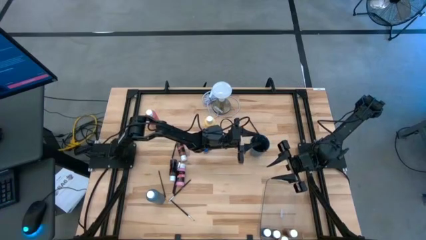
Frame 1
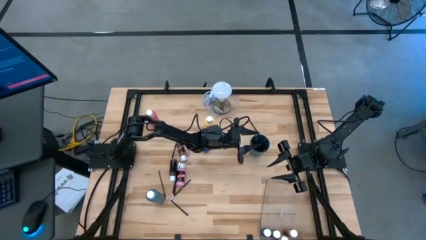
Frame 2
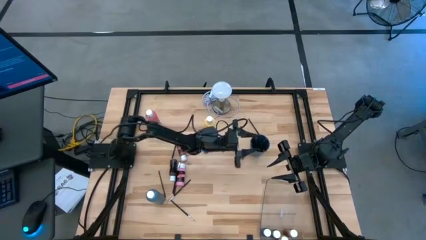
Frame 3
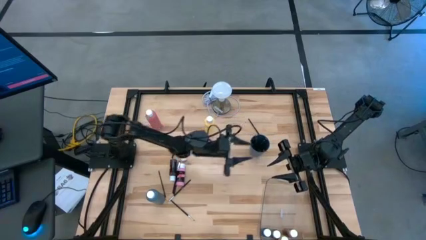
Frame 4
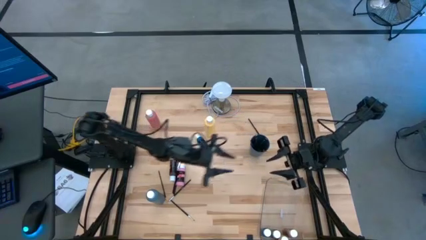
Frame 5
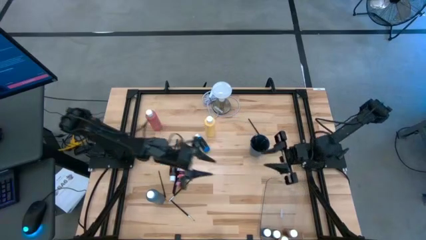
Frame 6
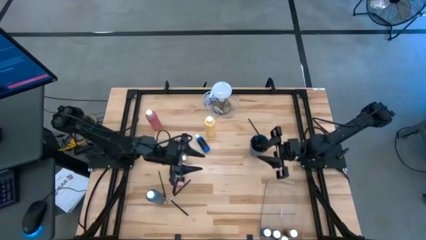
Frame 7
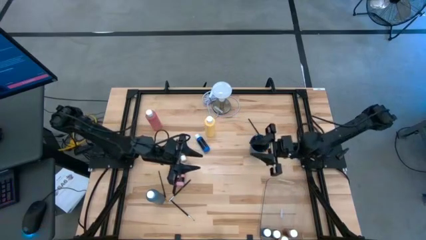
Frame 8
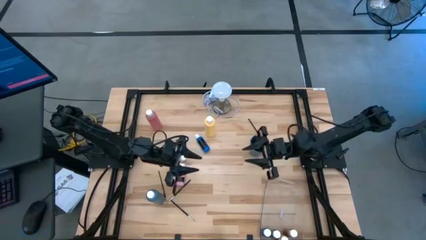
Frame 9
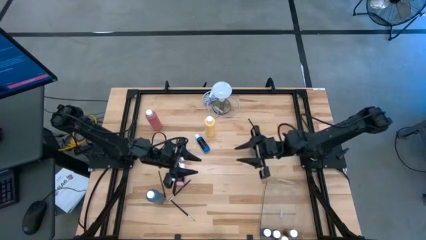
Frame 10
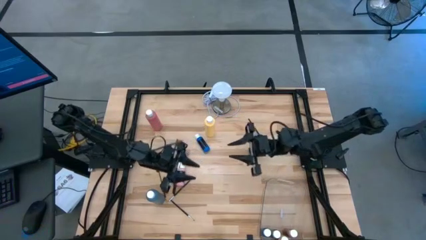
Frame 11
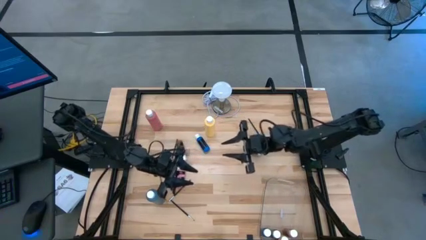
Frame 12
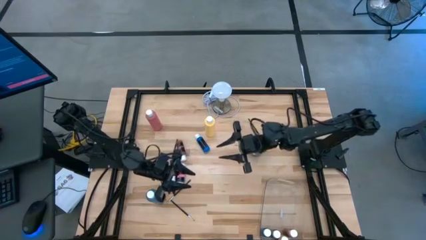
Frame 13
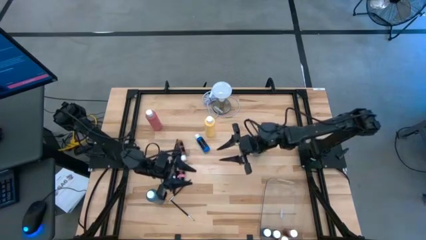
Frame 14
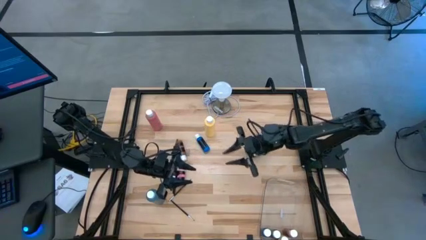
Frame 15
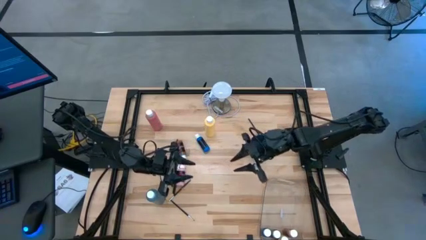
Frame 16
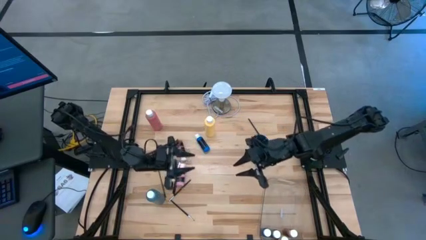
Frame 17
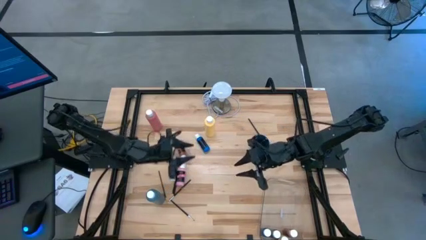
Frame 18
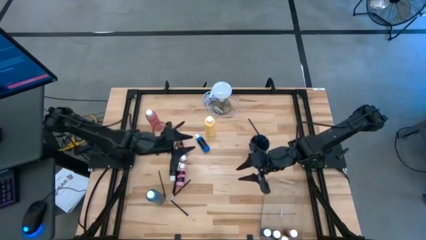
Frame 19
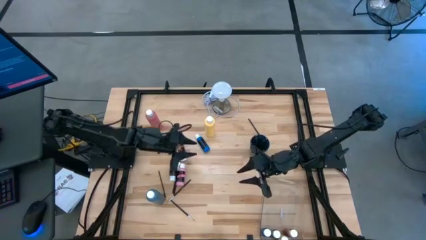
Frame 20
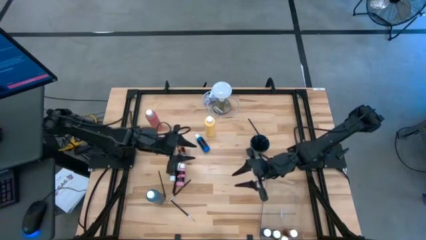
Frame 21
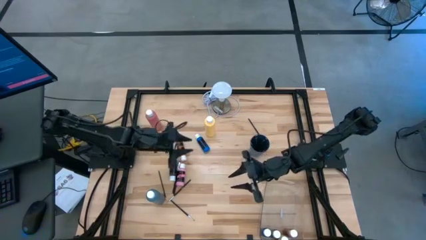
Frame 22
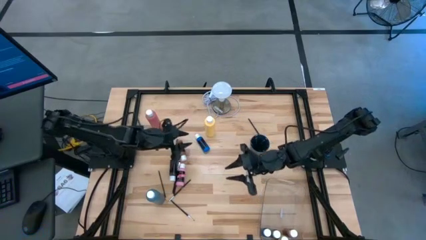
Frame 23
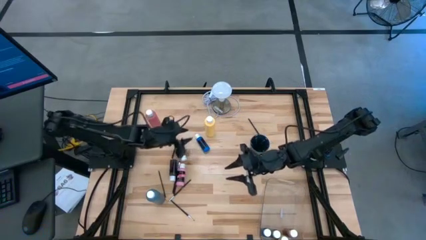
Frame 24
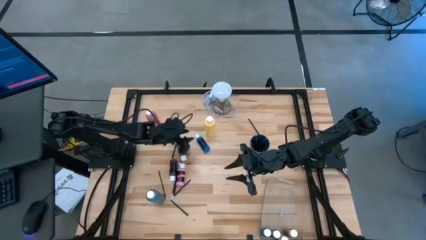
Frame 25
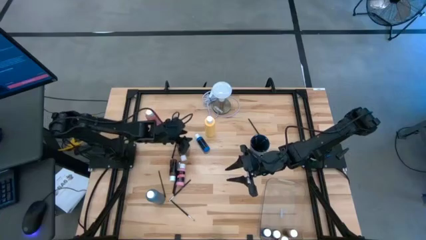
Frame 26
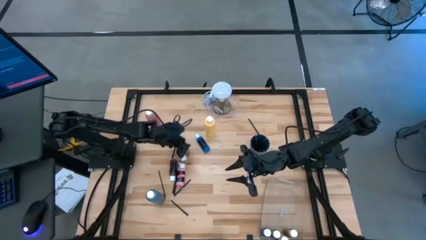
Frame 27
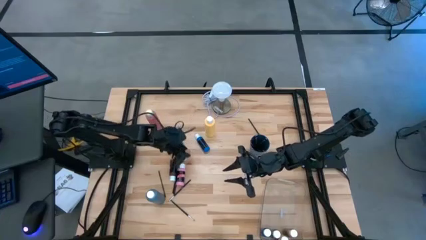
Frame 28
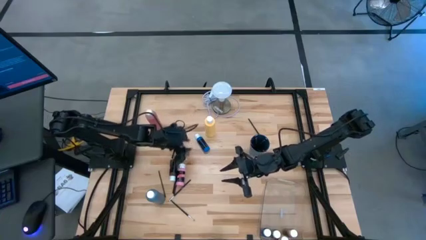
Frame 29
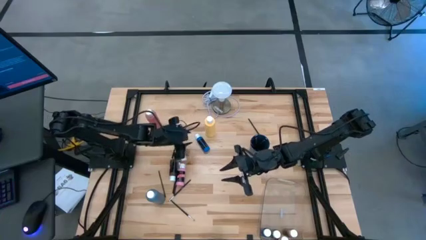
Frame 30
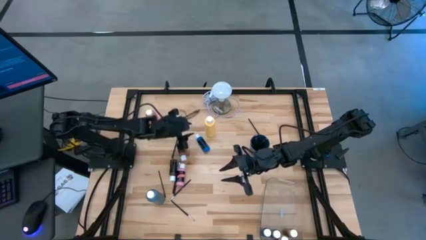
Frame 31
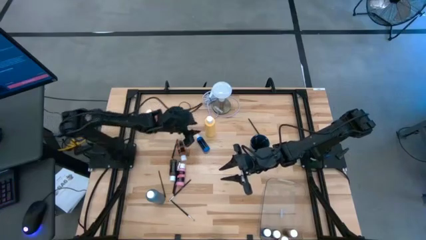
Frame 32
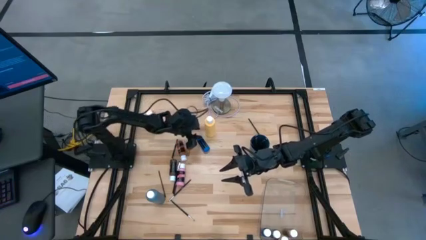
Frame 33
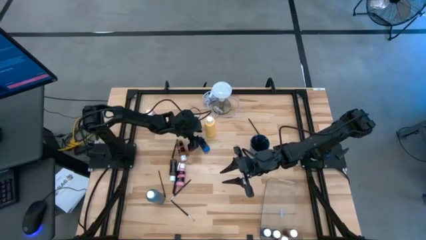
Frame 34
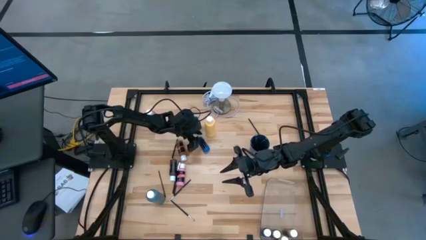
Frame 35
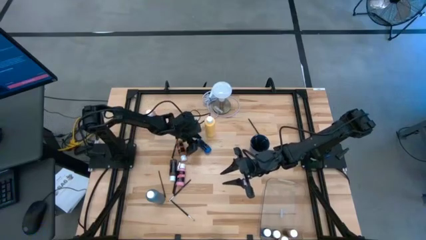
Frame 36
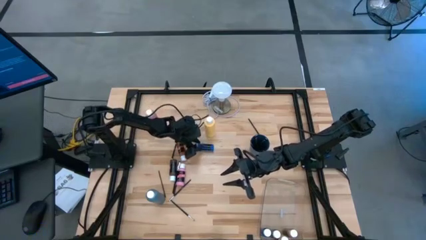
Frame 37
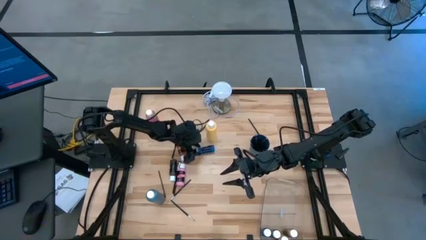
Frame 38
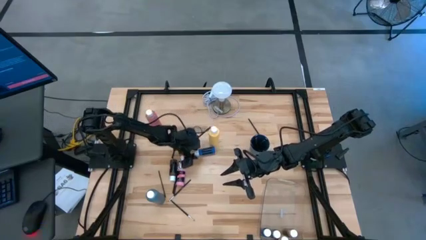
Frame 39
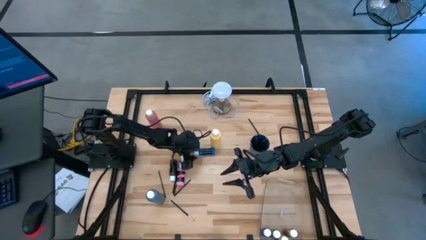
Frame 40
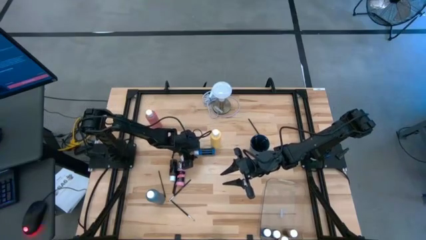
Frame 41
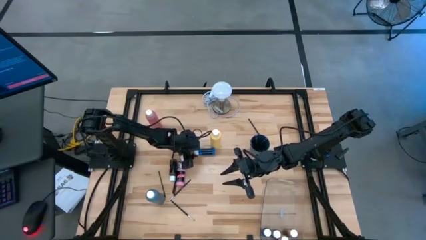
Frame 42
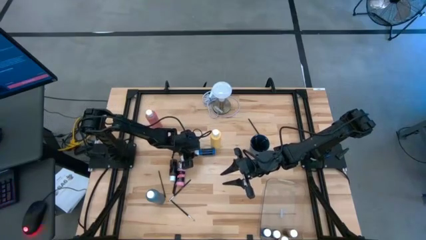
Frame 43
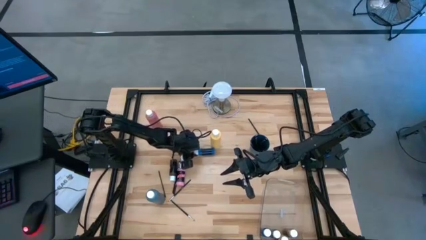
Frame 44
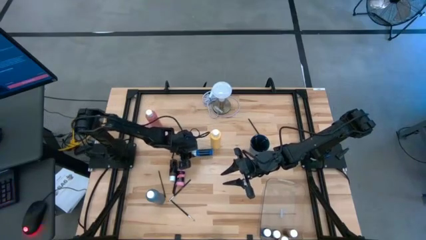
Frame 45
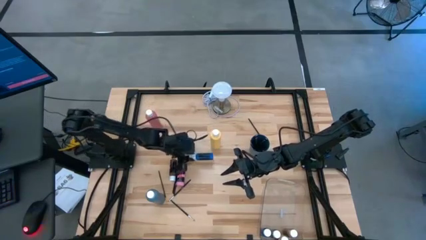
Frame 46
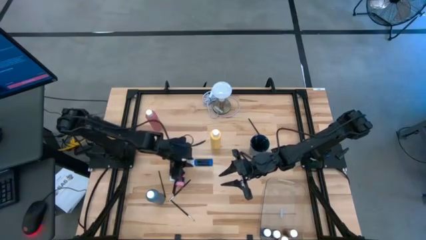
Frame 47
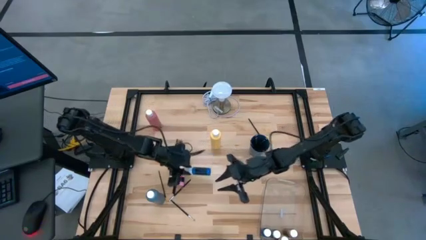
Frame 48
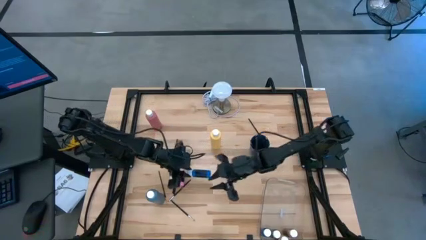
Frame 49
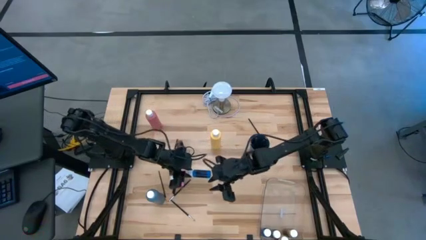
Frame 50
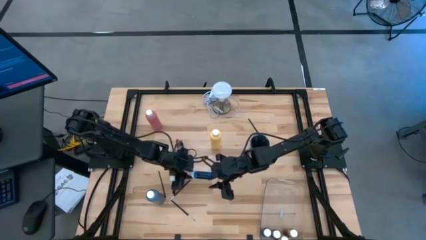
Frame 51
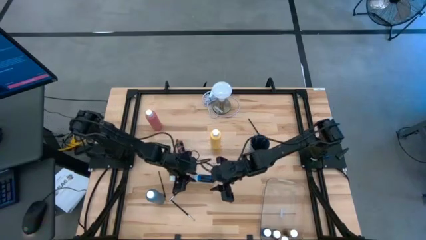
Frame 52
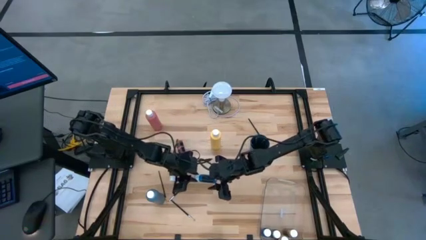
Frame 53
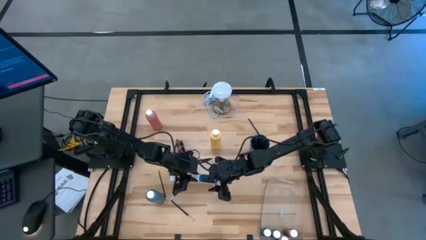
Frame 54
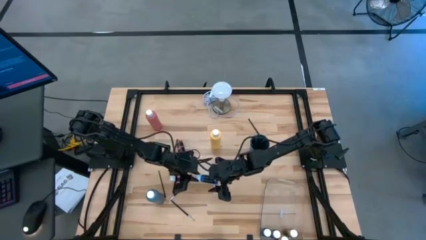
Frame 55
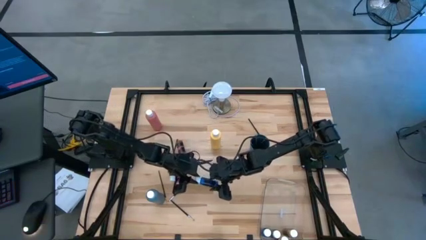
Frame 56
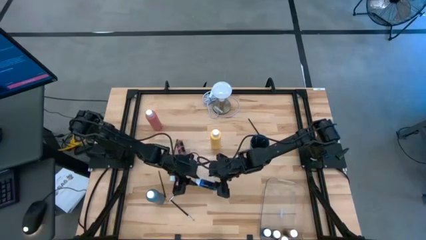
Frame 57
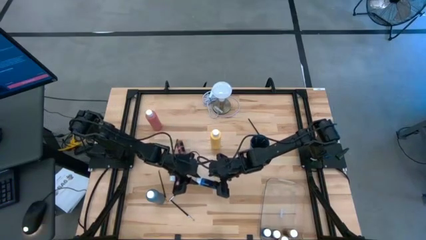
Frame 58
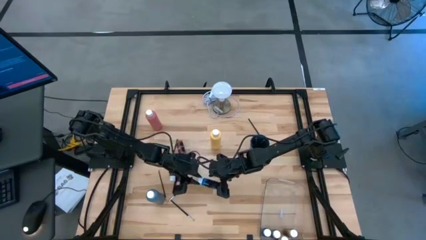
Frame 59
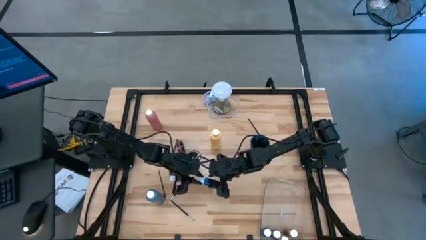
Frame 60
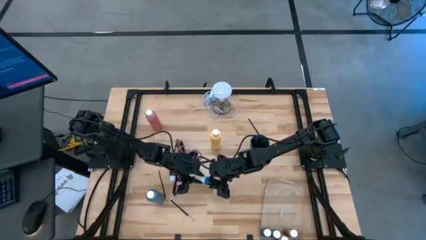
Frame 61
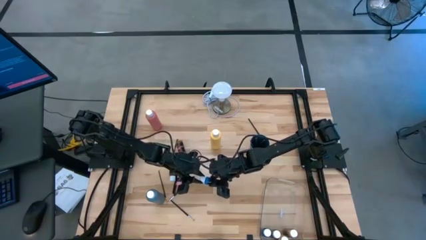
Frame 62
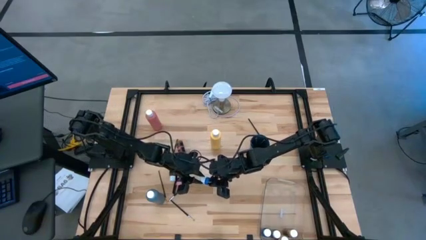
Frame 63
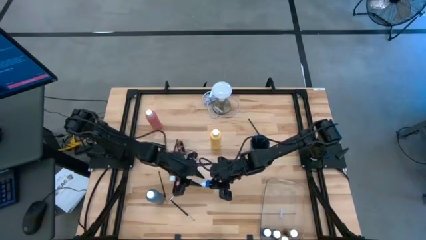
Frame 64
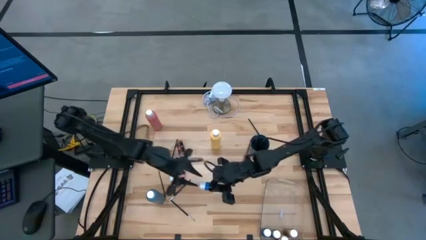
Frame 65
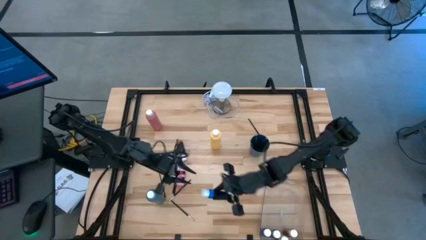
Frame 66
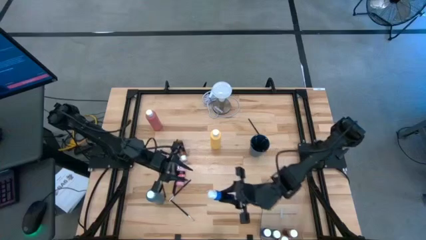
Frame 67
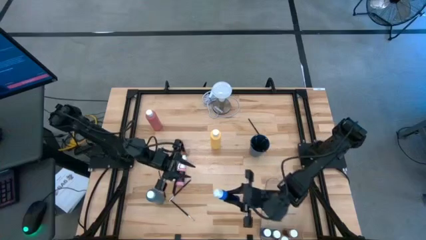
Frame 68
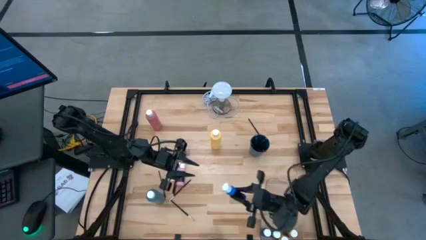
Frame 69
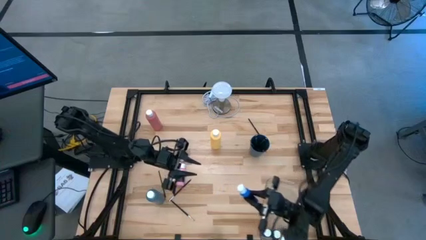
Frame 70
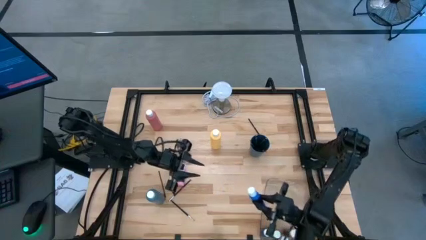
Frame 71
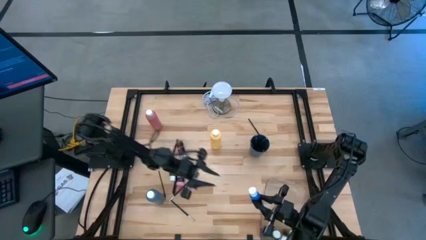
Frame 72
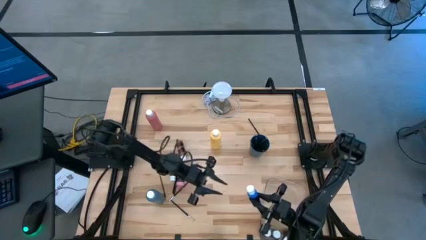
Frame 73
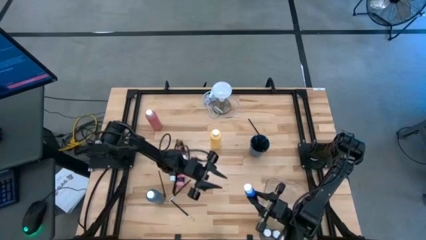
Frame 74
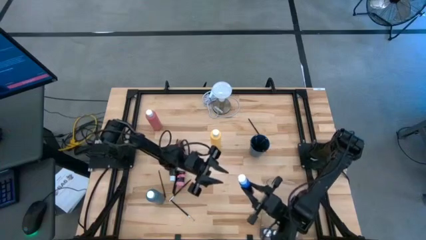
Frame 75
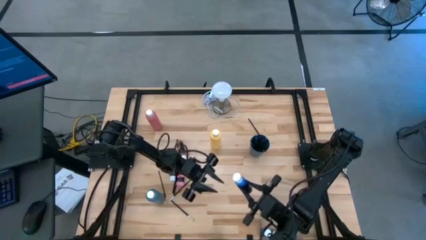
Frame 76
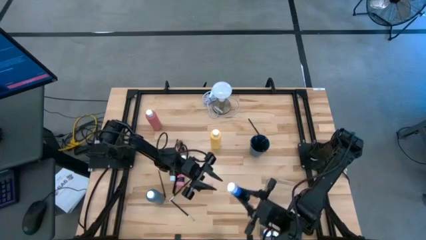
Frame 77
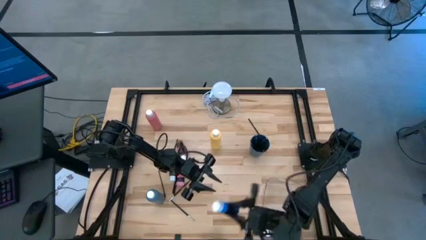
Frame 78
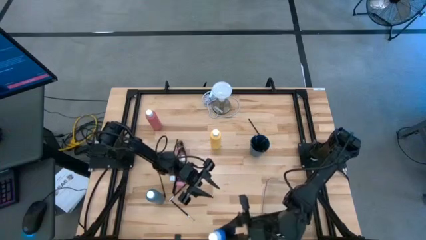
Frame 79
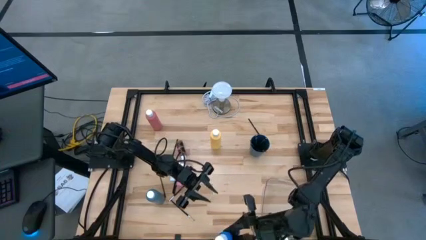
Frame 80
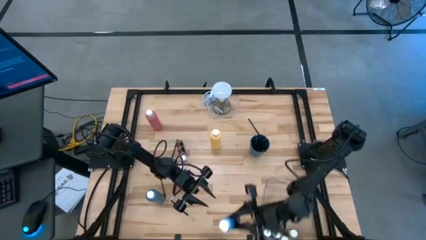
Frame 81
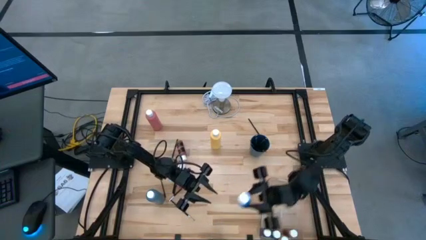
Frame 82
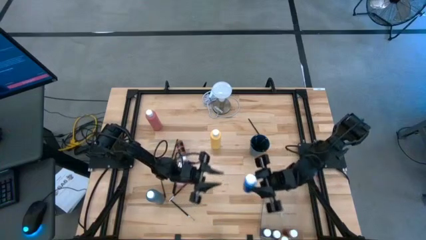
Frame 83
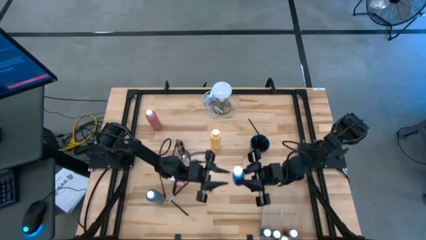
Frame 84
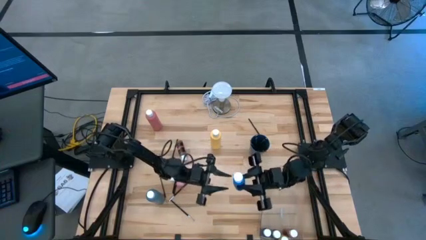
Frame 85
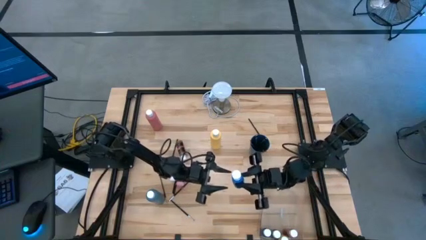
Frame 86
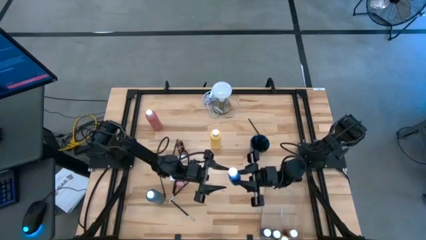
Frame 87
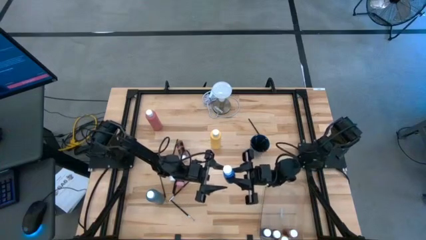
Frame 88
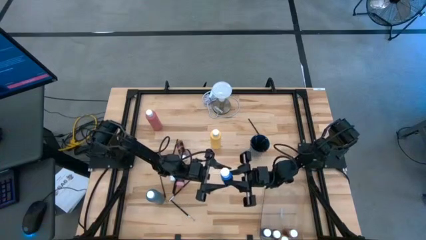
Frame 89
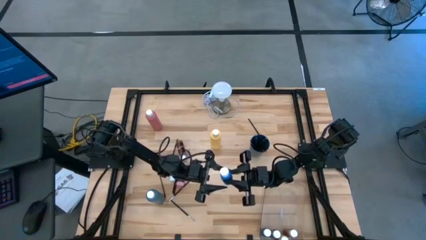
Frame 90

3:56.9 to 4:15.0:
Task: Pick & Place Paint Supplies
Put the small blue paint bottle into the transparent bin
